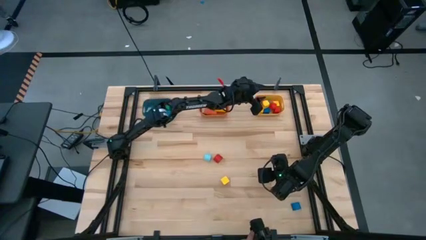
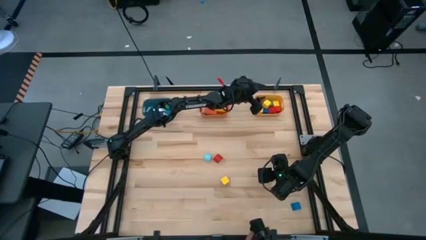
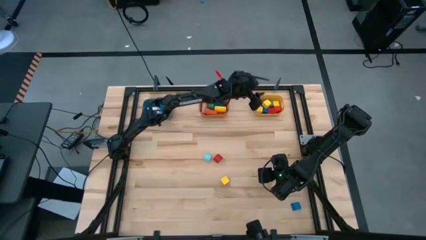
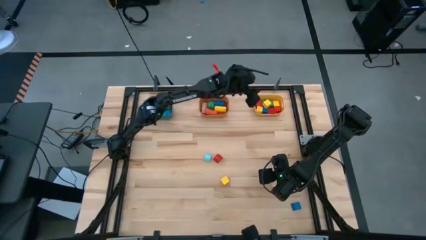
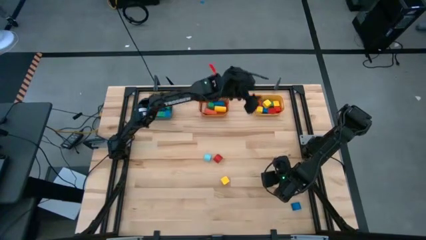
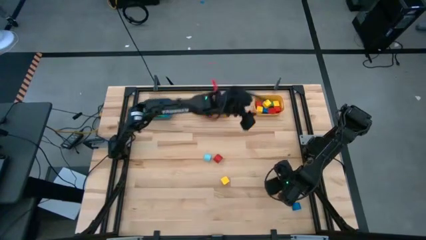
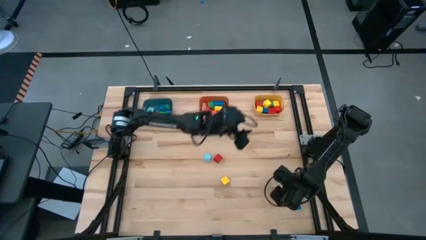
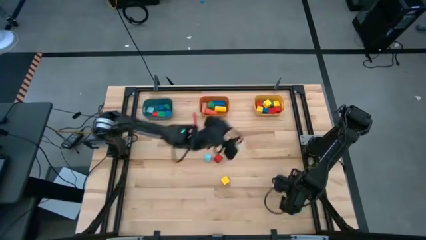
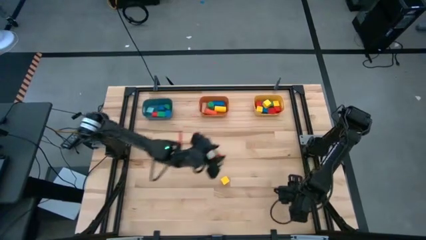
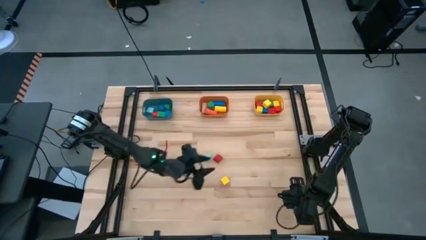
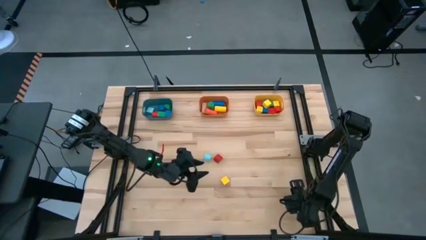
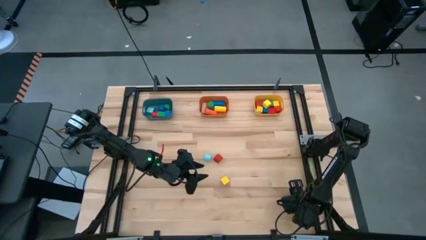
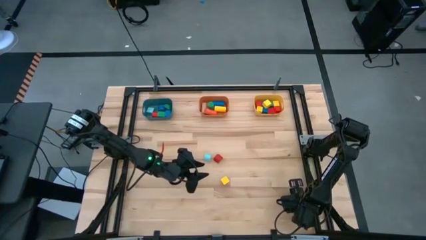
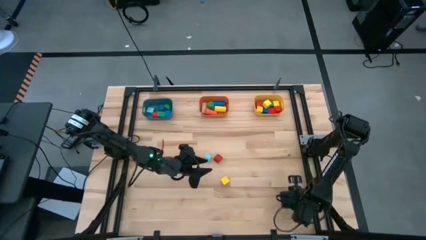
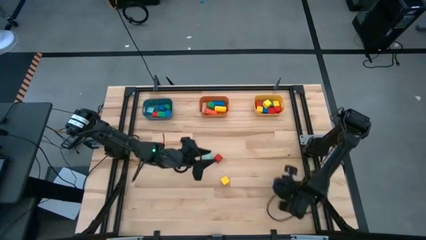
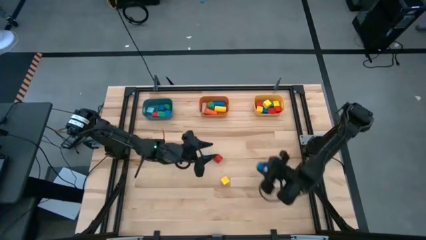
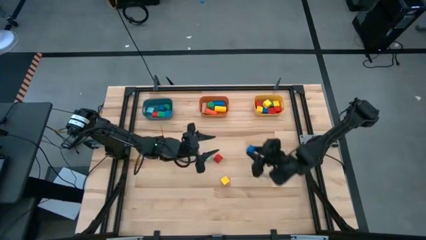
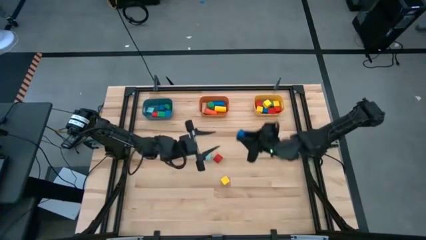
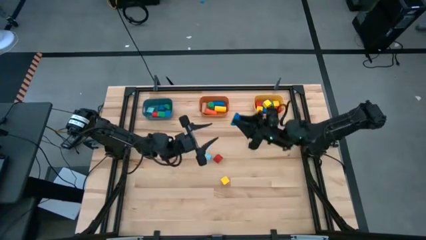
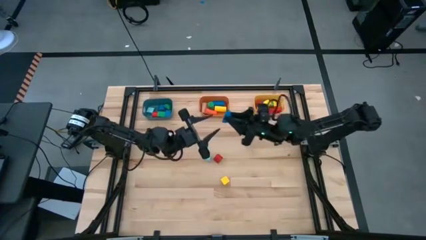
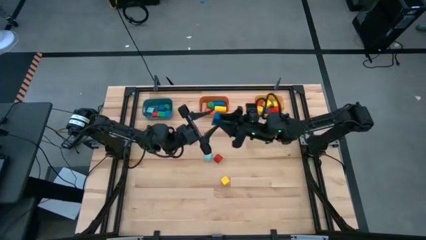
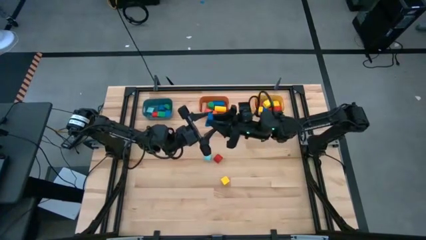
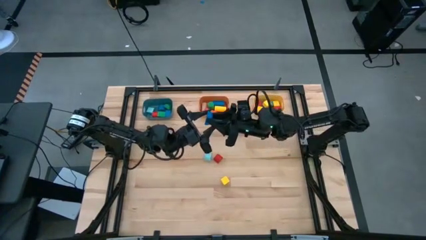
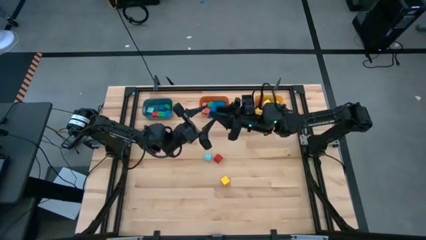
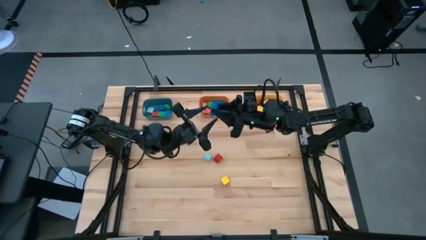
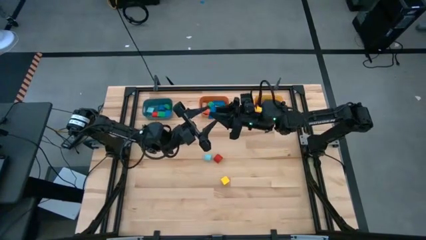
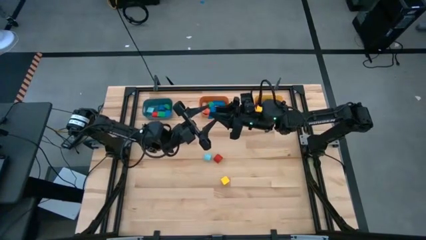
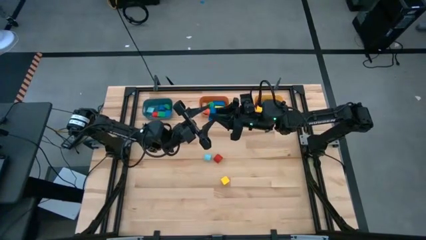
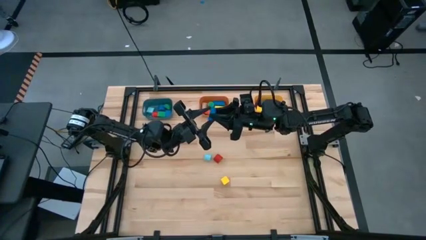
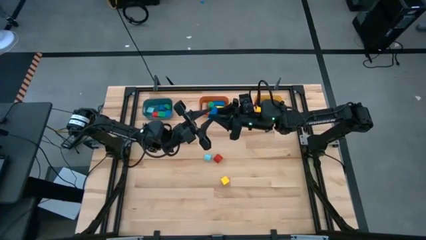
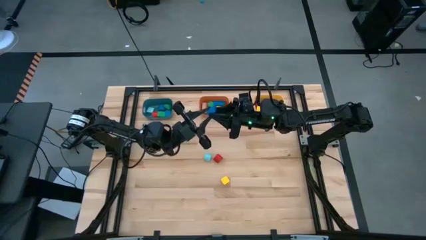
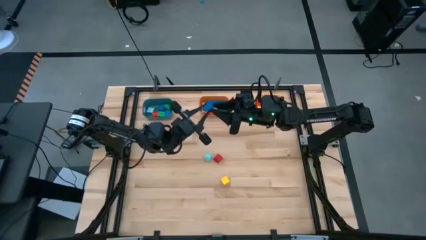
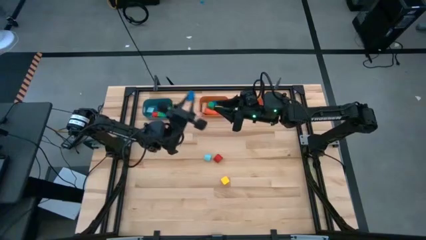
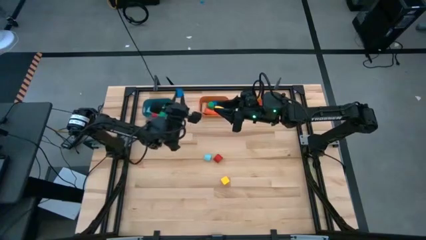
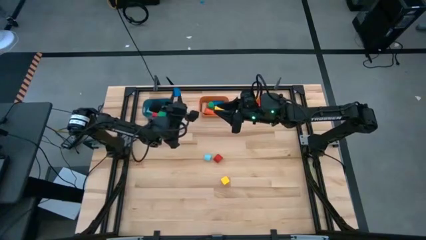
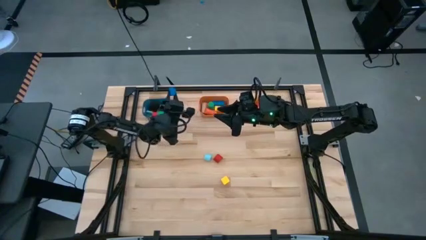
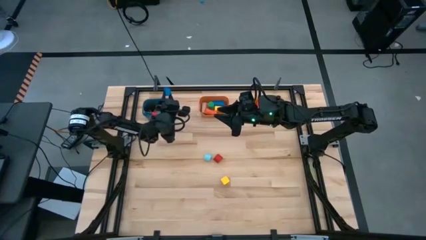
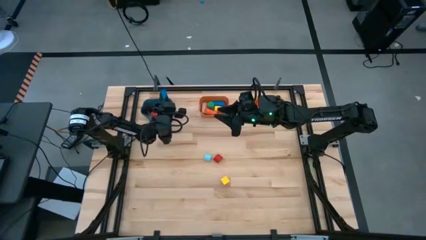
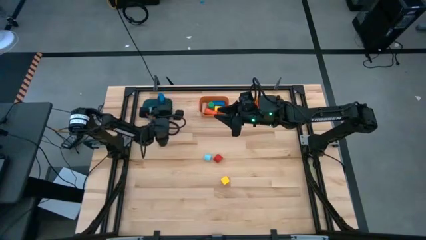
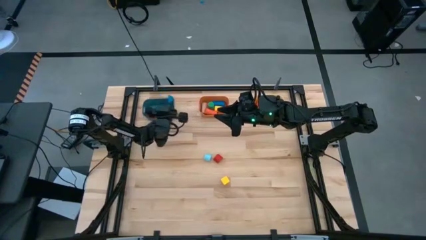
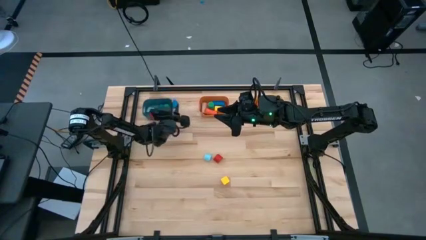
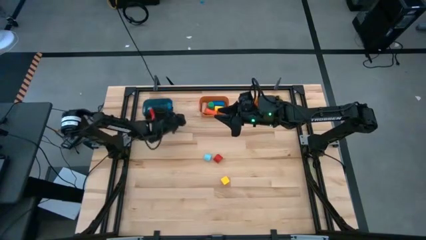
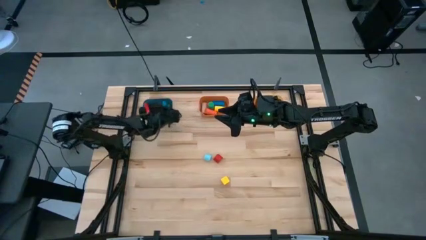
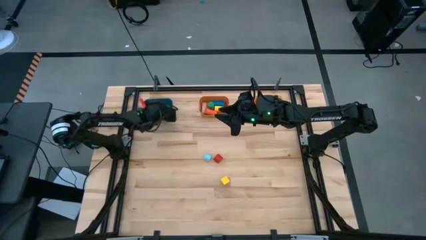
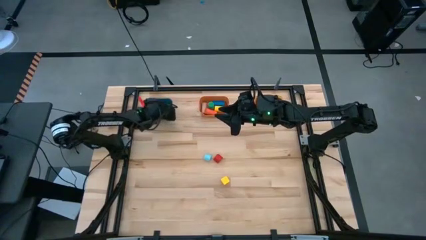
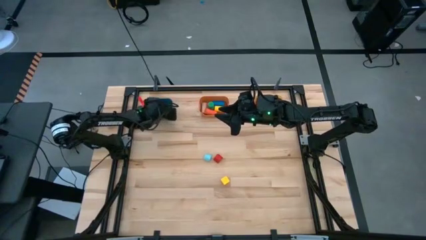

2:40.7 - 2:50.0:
Task: Sort blocks by size
Put the blue half-circle block into the blue bin

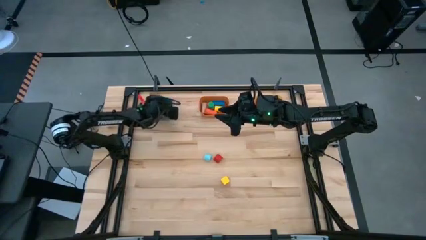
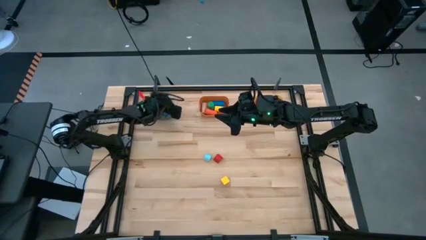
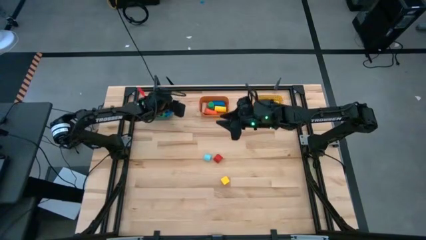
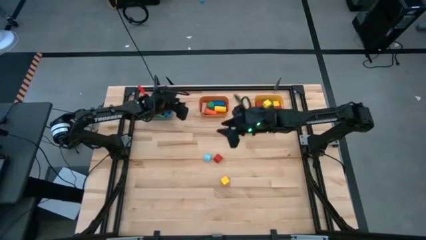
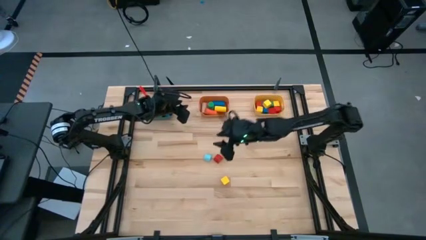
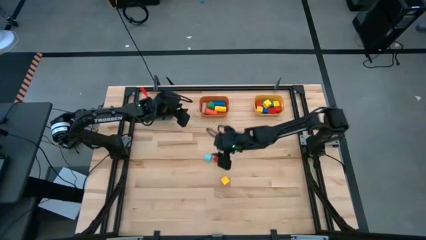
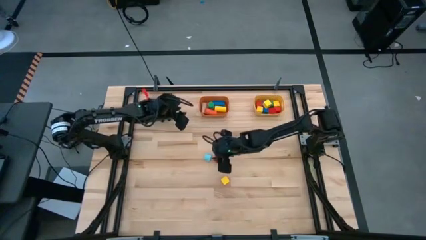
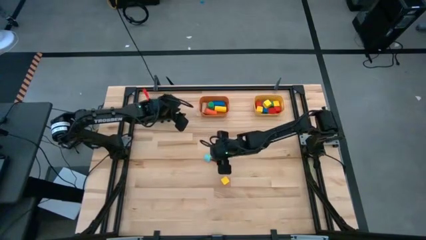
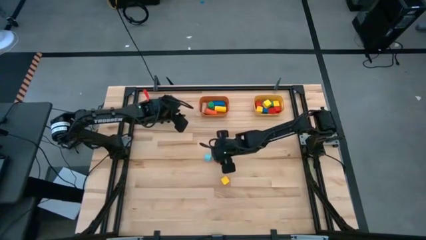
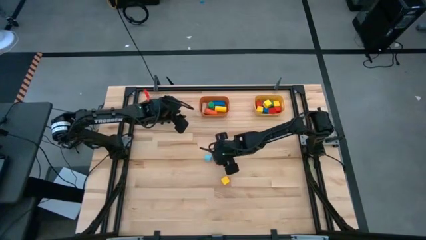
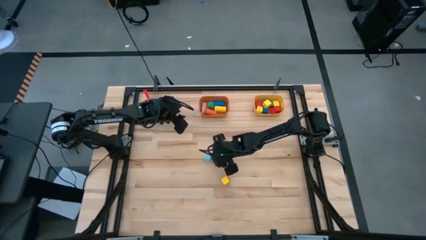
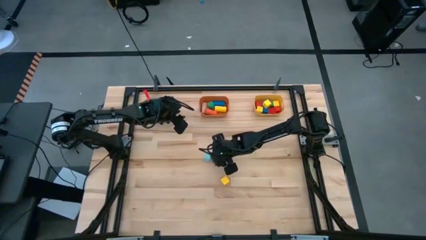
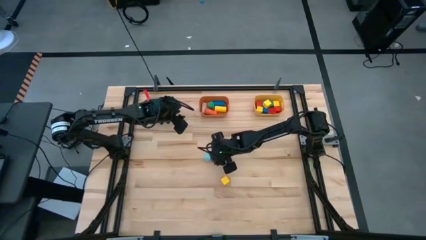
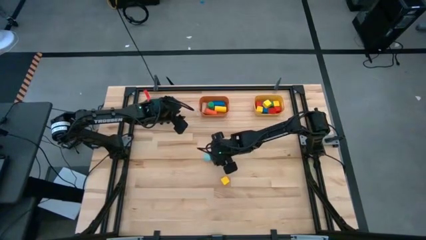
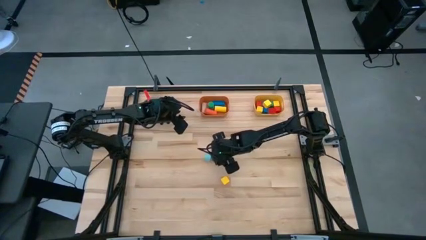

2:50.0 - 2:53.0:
Put the red half-circle block into the blue bin

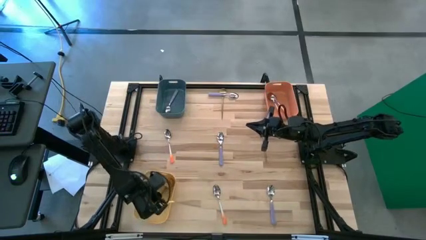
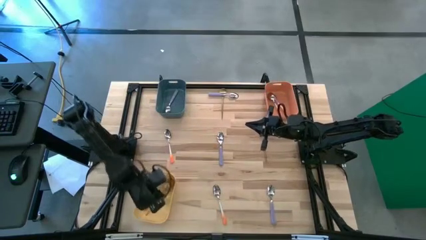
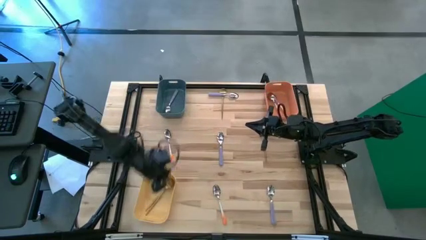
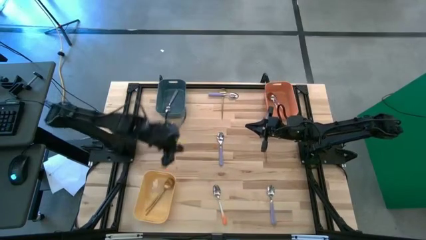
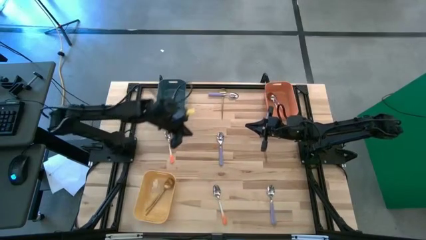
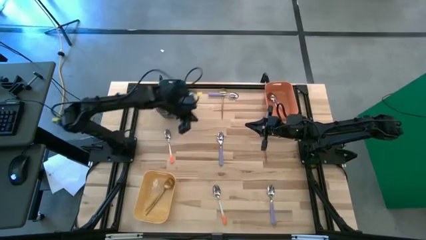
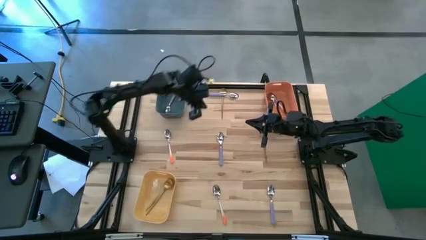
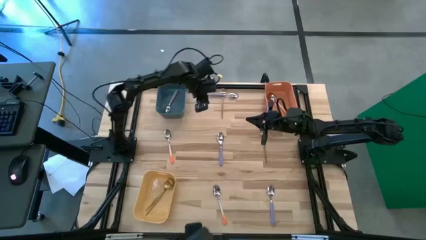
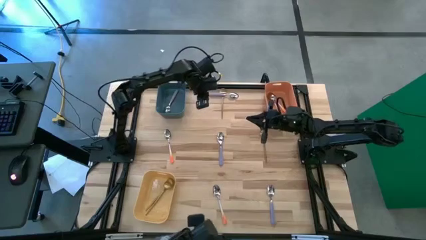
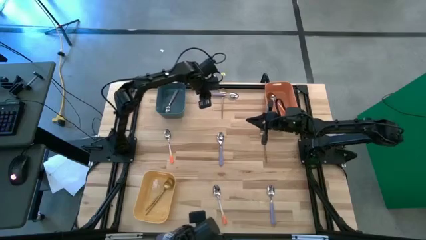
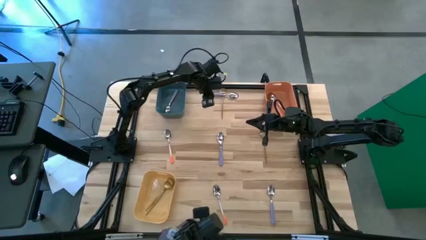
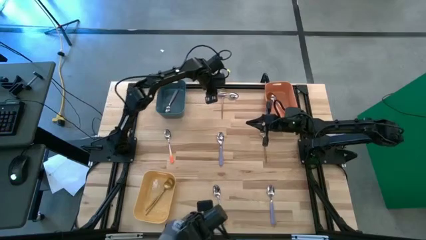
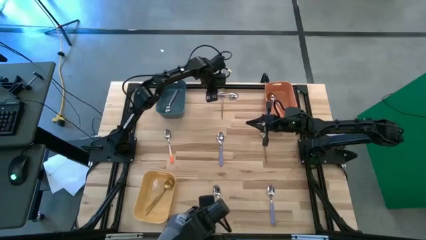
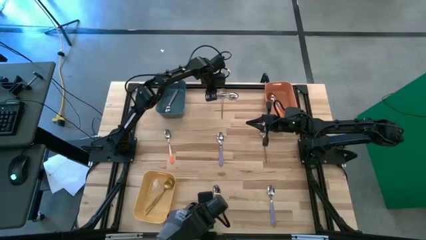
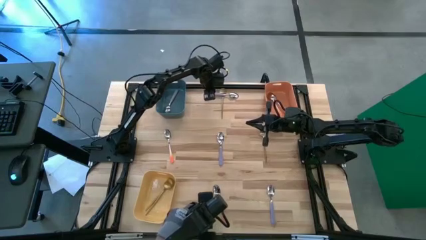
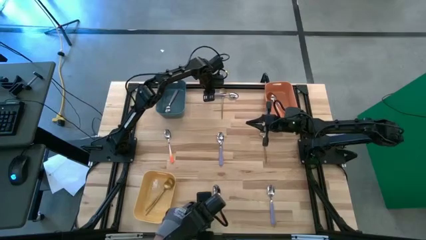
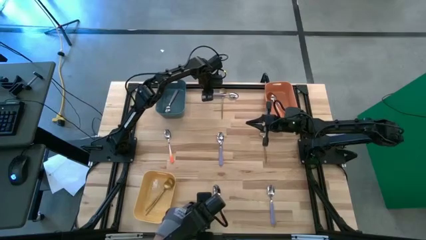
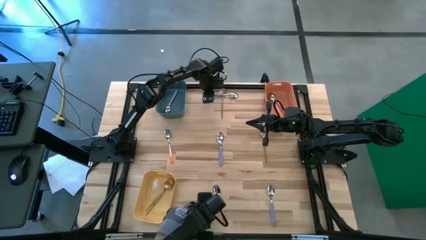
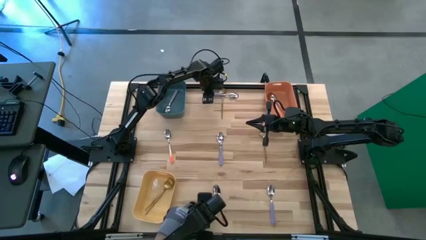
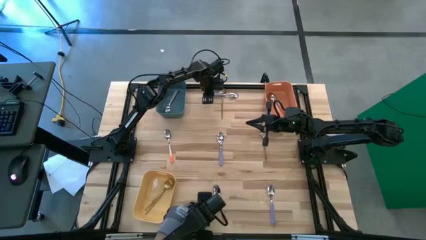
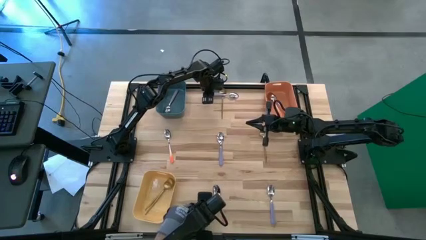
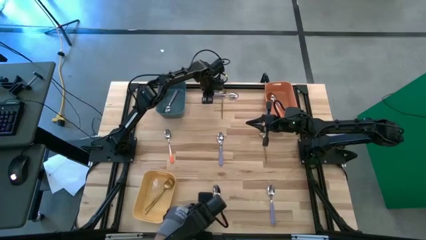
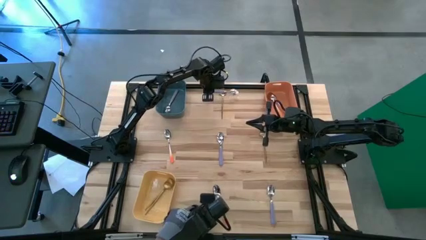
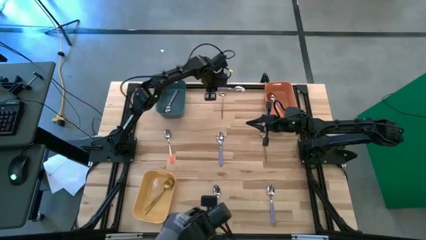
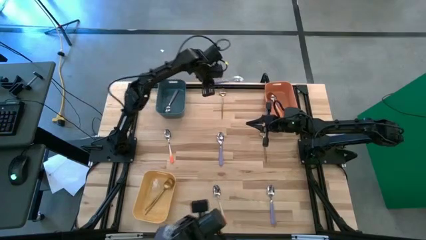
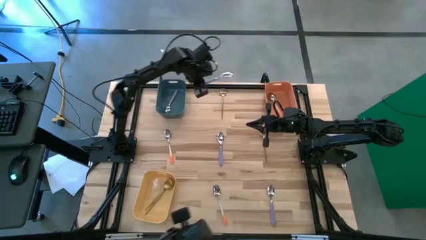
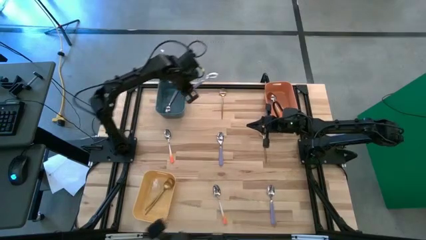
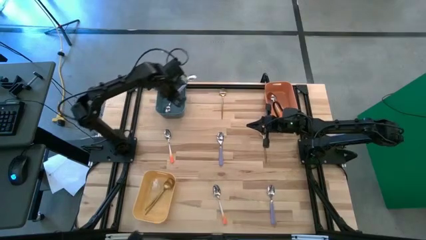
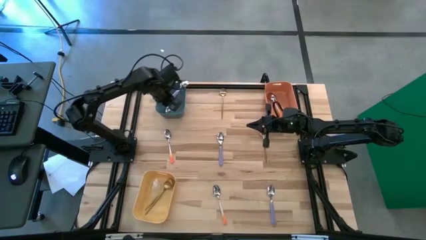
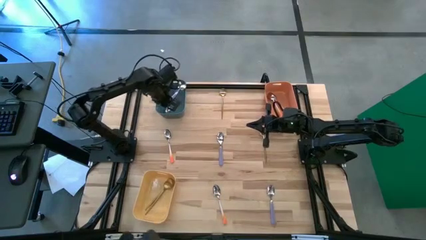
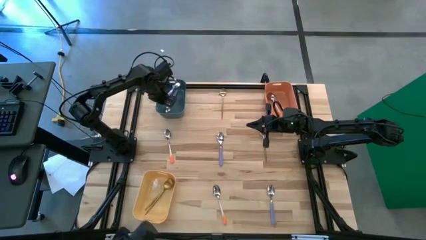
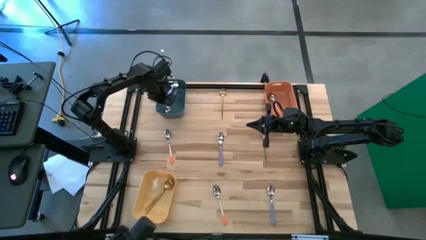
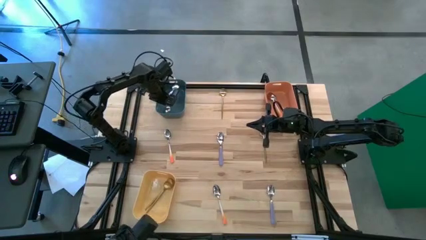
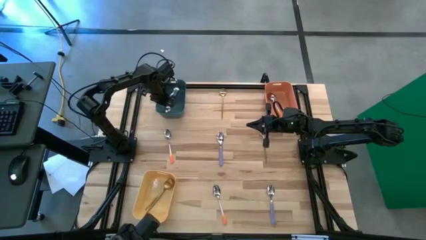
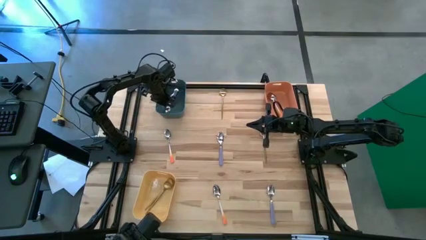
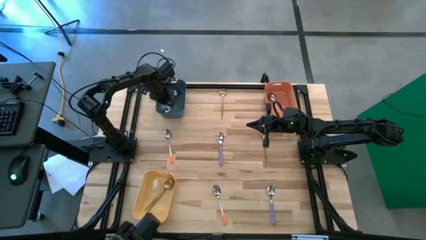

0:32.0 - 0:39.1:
Task: Sort silverware by color (type)
Put the top left purple spoon into the blue bin
